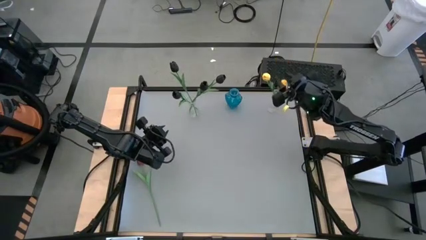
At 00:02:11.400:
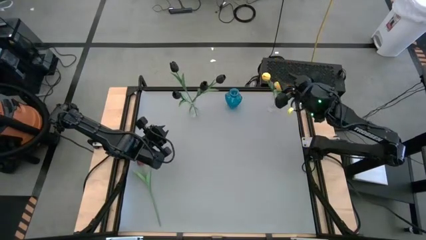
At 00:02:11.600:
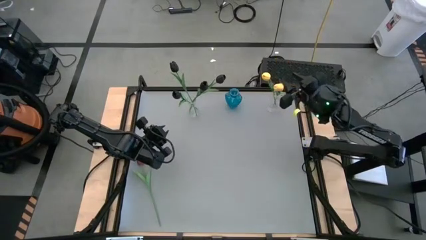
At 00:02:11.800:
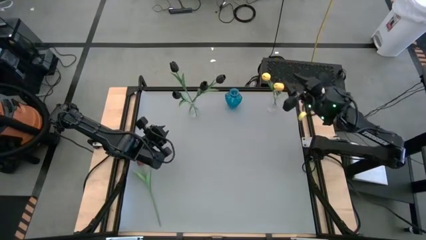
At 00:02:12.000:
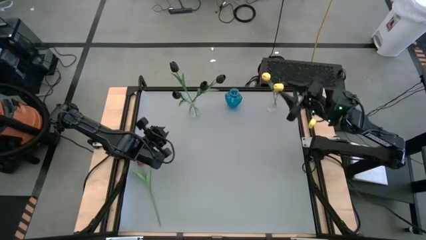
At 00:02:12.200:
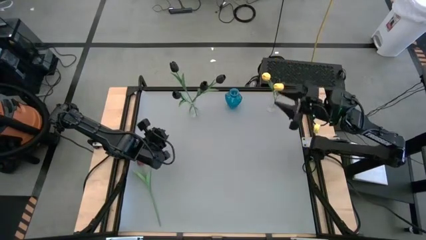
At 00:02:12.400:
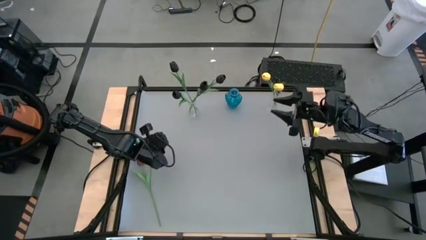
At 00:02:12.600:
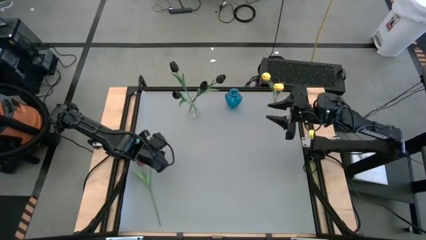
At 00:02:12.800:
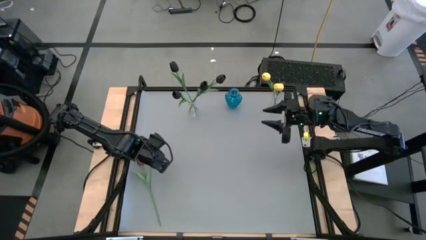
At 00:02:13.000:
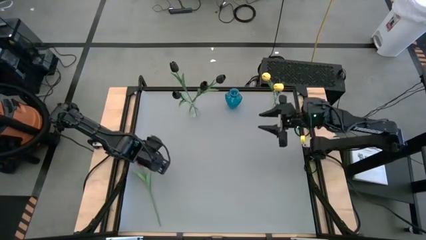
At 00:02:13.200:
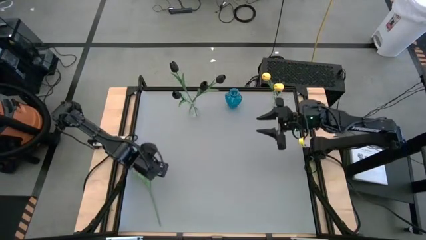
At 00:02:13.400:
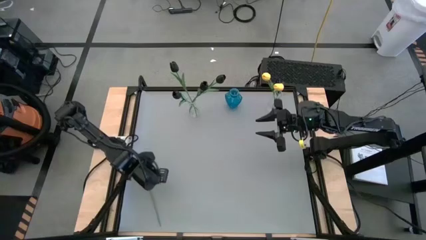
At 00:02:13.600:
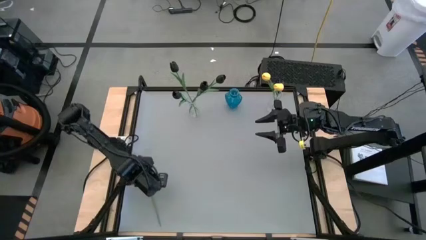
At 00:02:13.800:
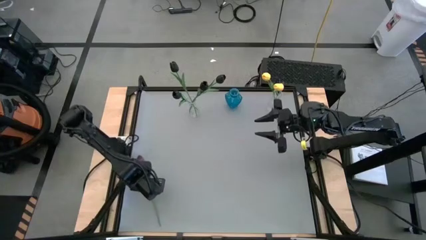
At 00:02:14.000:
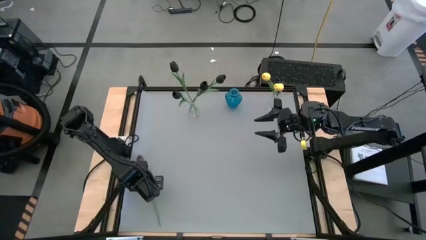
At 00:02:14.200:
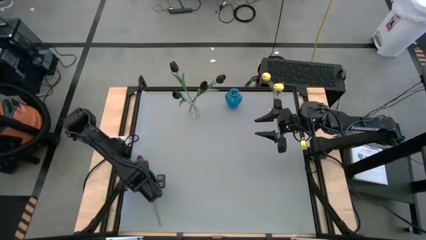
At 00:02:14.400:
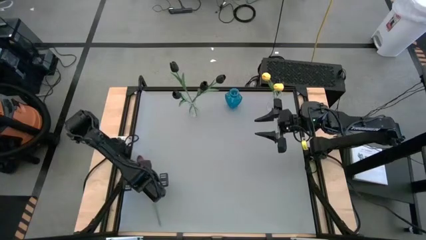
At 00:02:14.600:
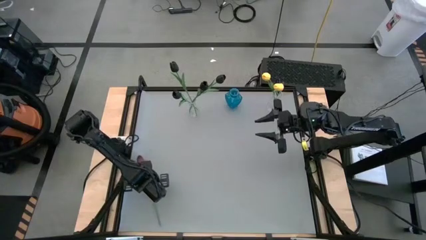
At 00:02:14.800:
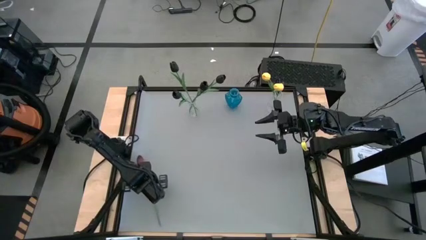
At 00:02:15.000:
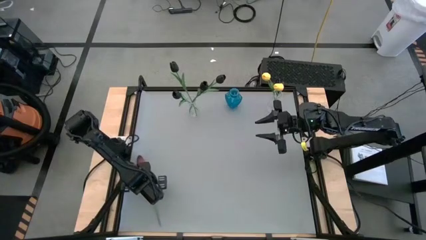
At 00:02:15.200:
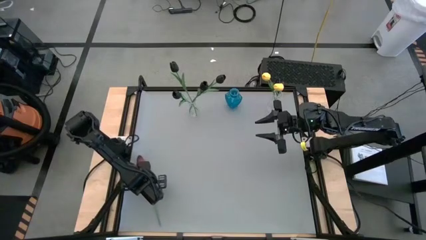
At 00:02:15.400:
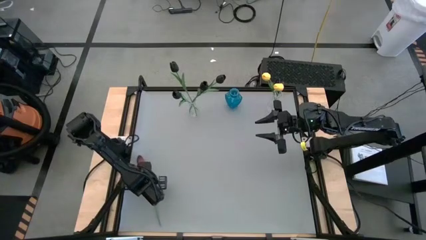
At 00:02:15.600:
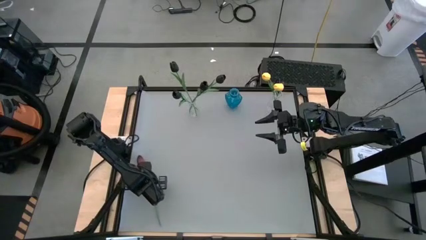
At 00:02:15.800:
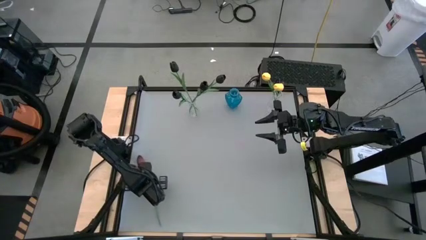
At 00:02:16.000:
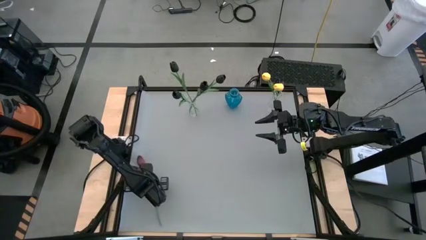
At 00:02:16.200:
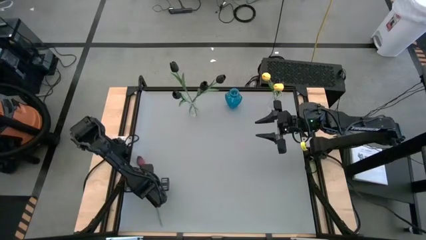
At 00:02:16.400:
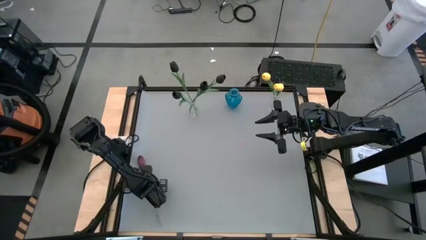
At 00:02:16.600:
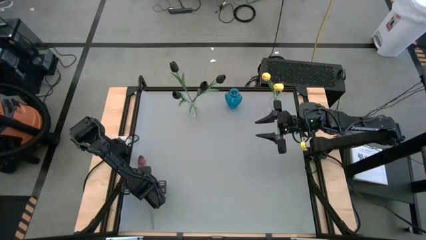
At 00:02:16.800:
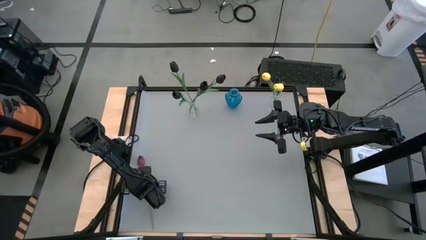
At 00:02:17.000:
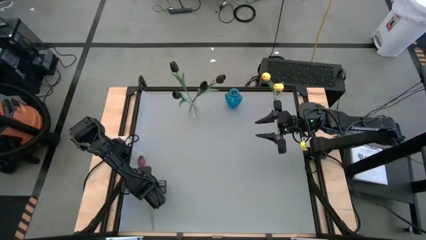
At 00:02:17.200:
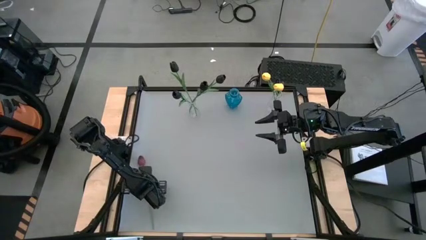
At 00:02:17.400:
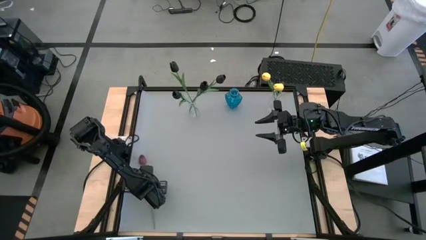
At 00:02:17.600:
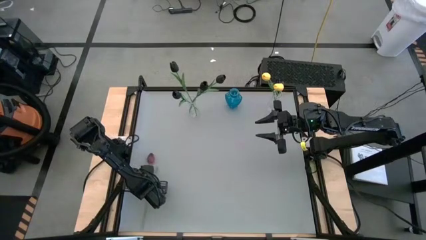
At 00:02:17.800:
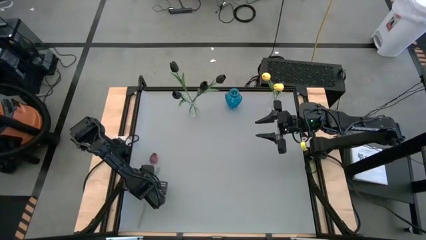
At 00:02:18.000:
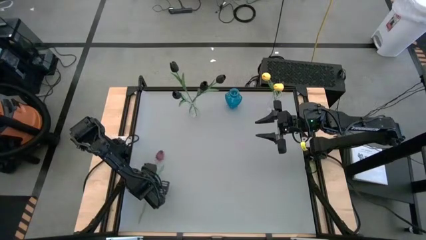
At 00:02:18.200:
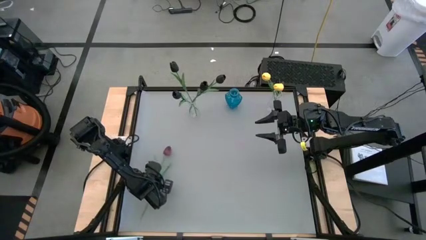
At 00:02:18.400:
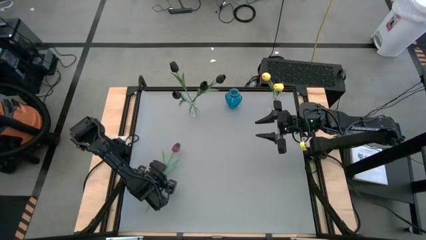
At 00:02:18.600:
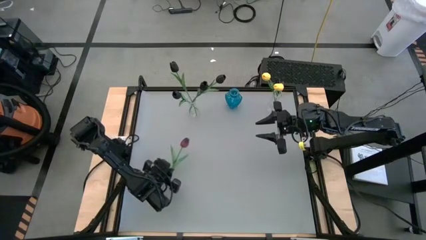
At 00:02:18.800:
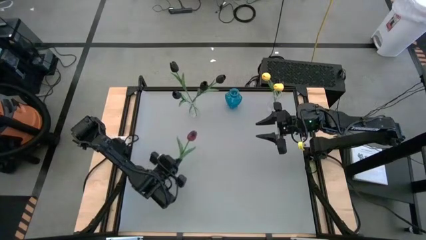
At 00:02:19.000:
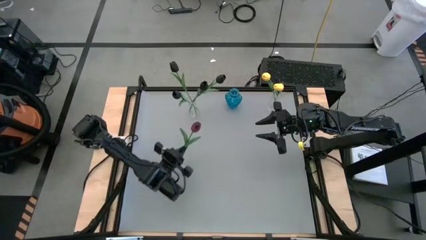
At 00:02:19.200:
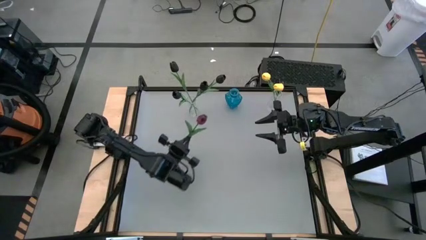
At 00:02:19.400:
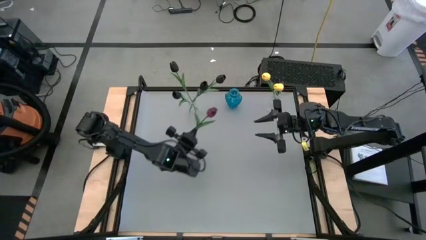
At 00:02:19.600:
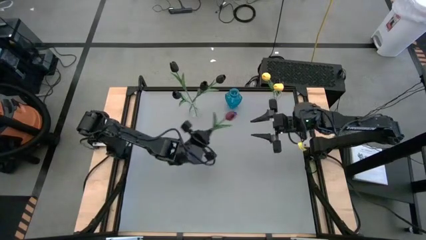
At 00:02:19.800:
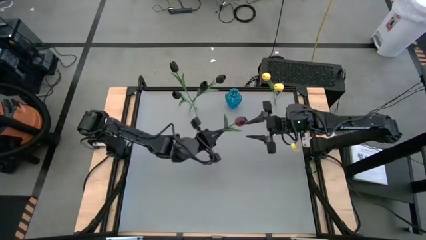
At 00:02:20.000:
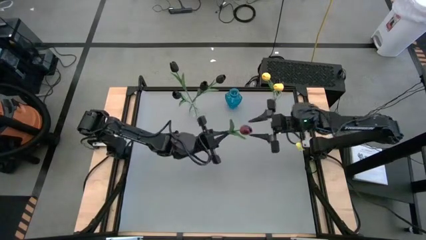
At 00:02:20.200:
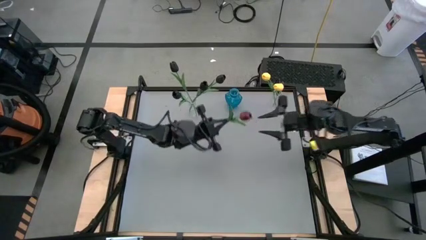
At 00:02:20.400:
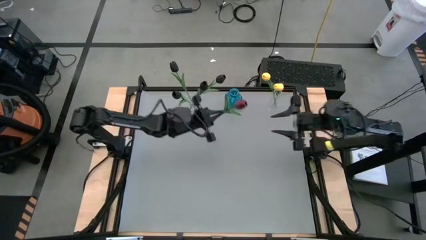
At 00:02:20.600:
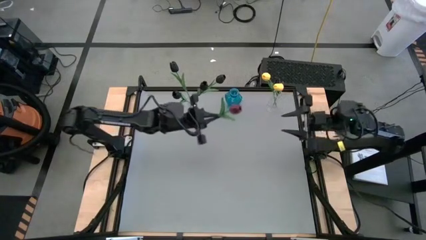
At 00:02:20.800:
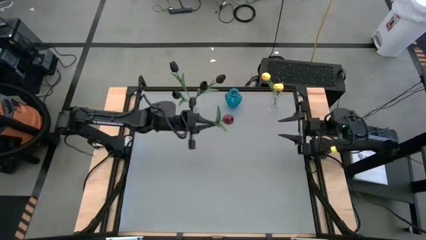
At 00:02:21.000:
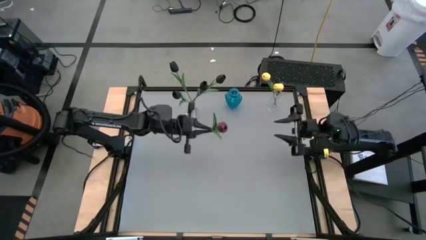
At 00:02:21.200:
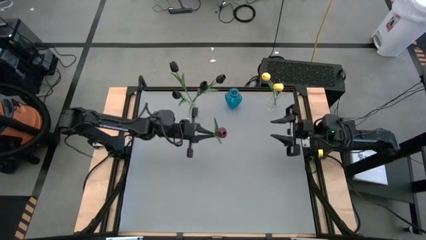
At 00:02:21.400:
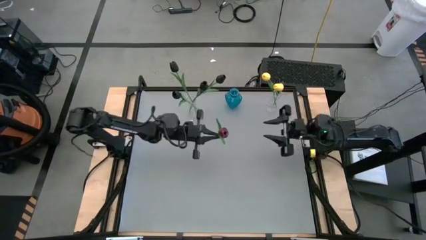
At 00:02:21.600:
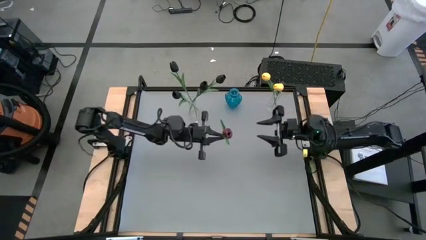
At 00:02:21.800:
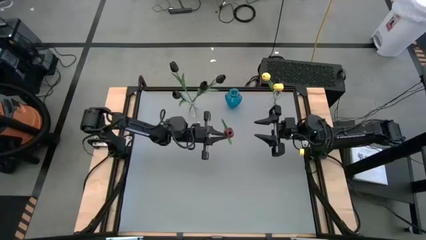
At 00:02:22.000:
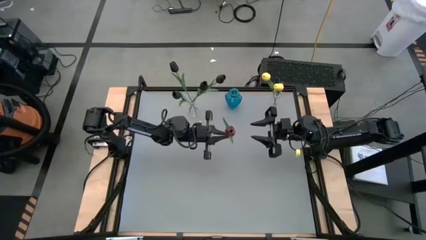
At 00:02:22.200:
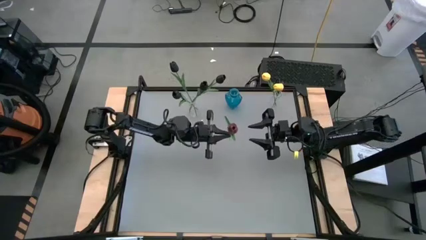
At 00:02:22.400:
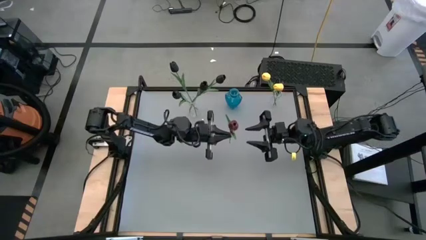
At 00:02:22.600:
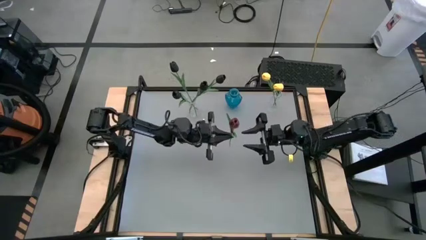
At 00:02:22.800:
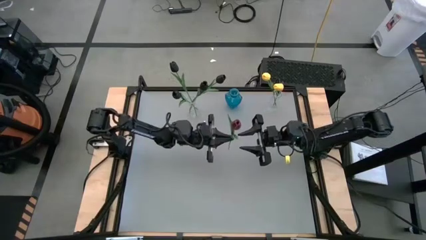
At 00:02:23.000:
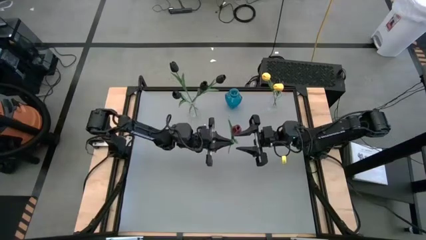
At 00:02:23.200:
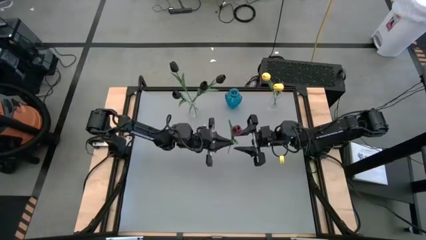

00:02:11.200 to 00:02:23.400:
Task: Sort flowers into vase by color
Put the red flower into the blue flower vase

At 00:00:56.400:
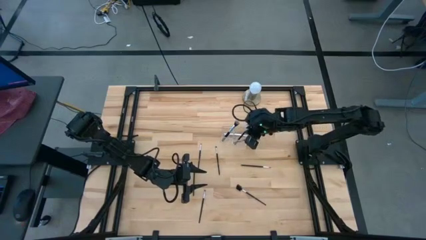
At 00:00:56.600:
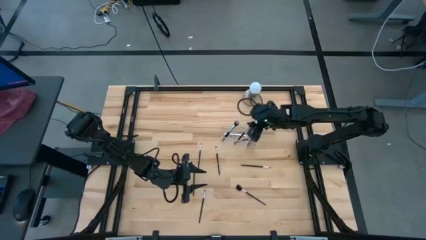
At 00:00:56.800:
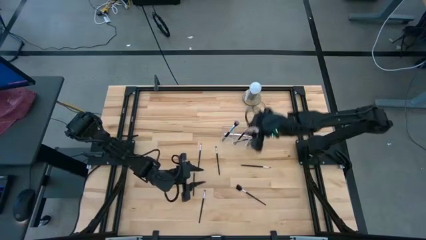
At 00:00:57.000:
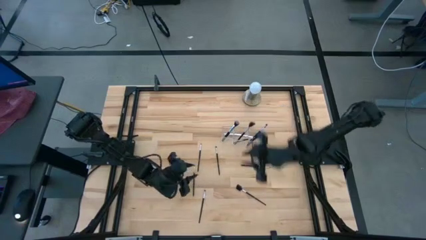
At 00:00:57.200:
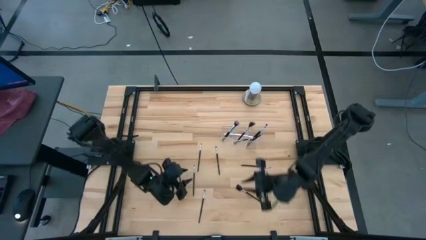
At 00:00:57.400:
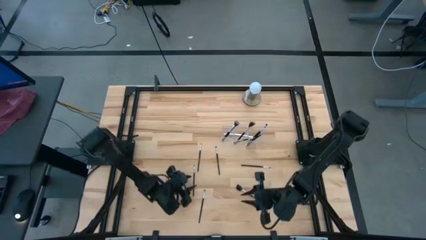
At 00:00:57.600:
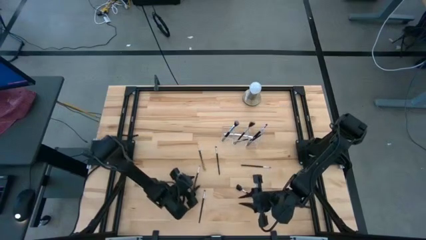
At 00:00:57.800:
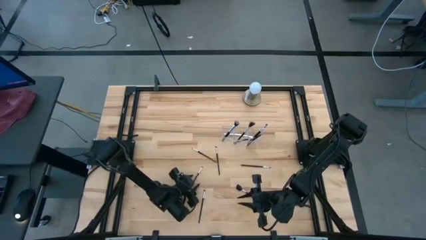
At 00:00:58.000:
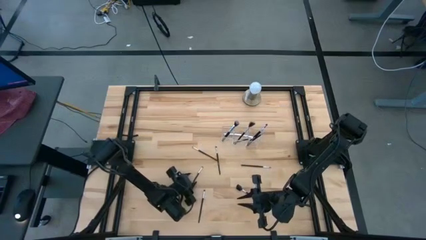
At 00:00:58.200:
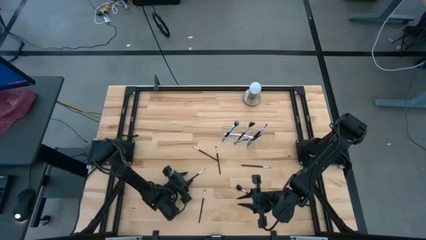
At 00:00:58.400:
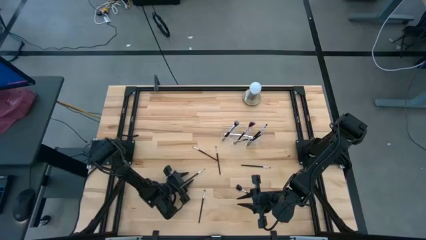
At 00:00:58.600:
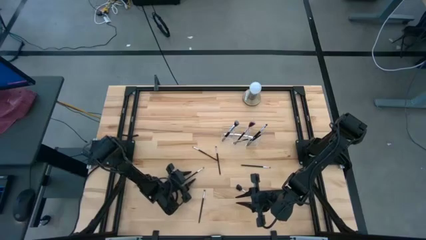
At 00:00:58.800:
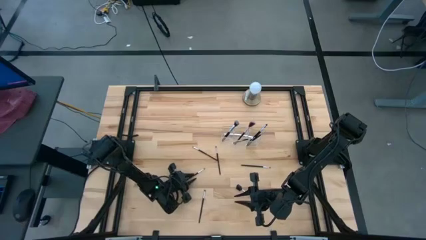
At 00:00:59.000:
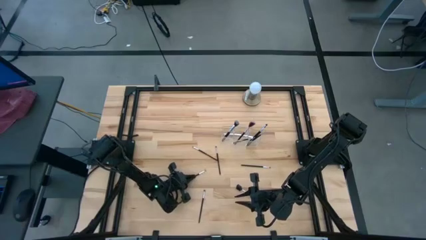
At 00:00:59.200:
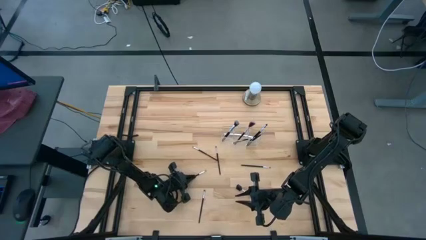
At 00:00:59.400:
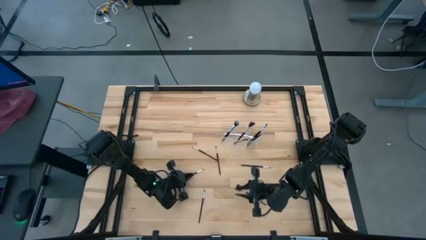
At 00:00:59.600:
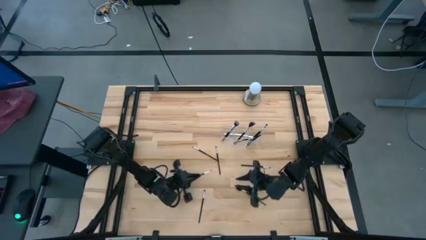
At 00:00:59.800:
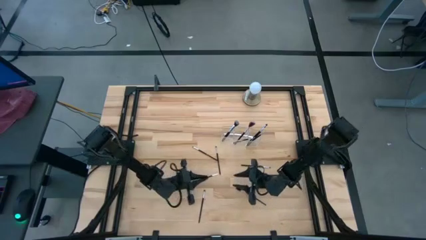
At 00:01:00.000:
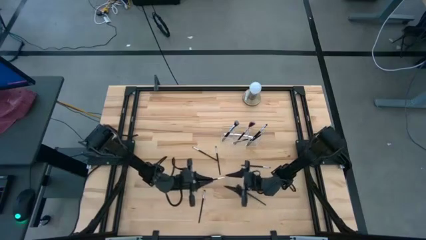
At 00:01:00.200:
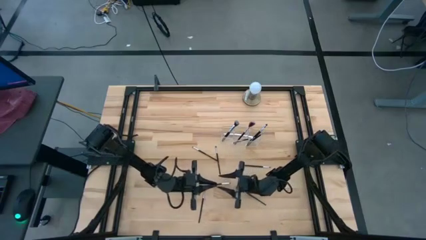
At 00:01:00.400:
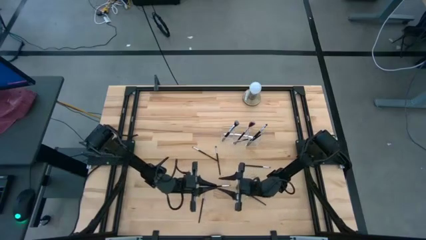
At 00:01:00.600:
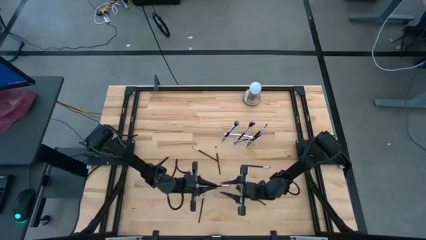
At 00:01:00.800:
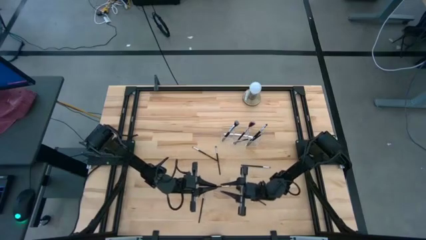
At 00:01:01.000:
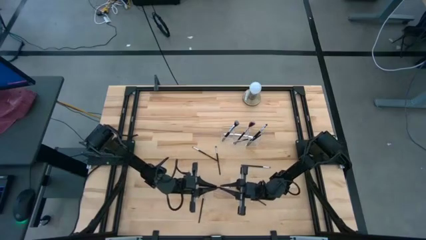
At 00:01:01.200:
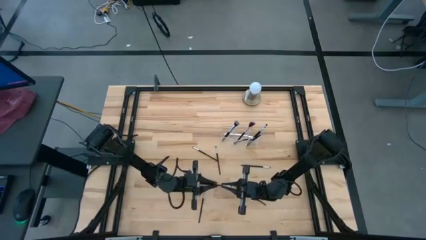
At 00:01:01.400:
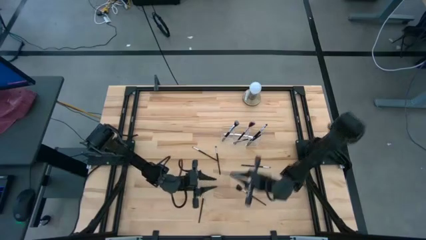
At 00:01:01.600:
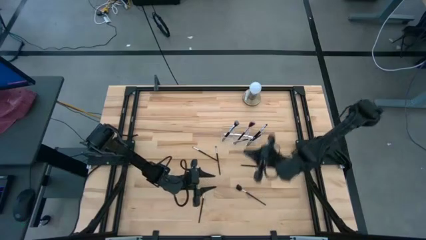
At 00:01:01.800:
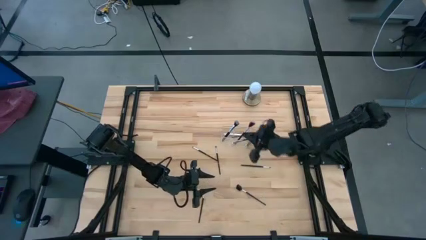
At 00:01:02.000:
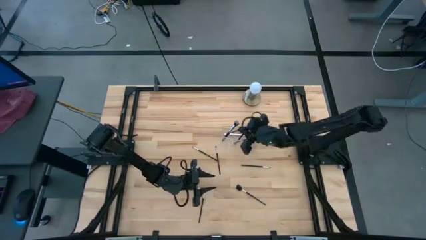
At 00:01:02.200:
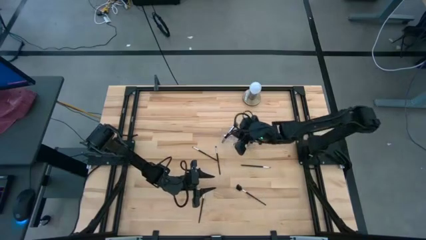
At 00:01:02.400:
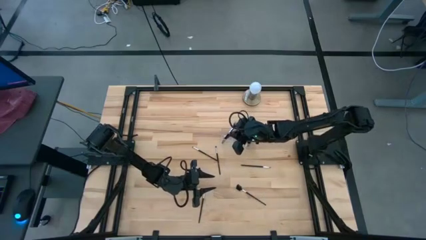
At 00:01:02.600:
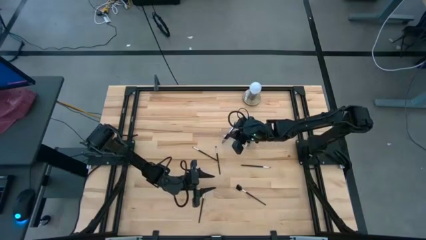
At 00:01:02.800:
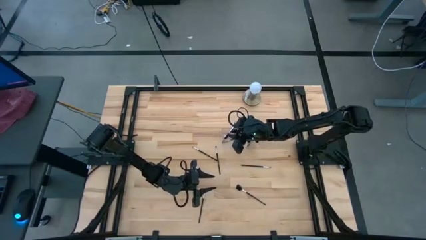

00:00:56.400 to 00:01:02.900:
Task: Put items in baskets/containers
Put the black eyeshadow brush into the transparent organizer
